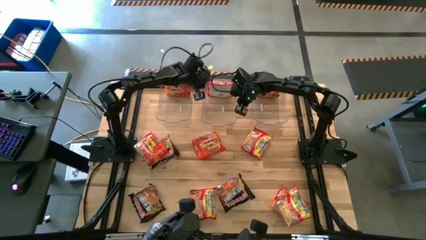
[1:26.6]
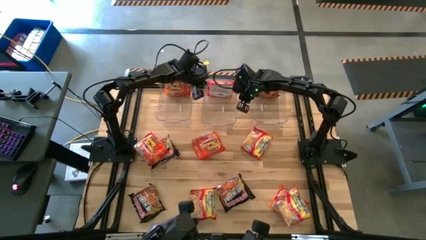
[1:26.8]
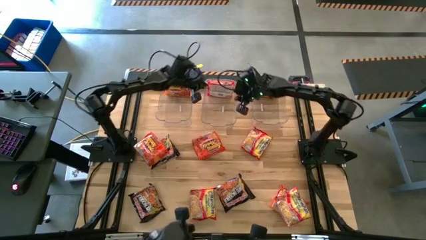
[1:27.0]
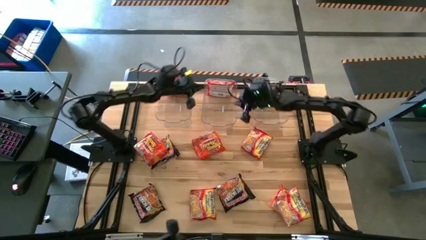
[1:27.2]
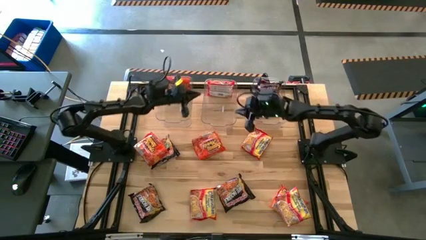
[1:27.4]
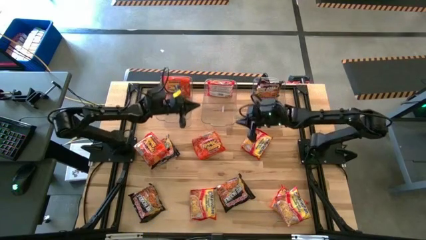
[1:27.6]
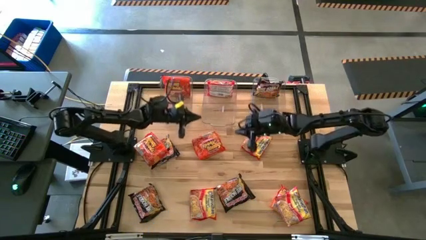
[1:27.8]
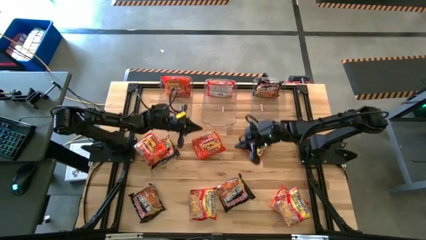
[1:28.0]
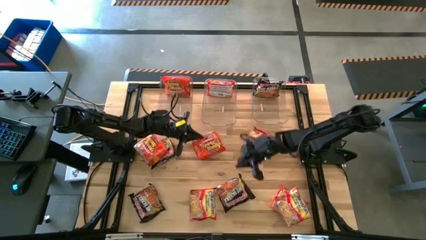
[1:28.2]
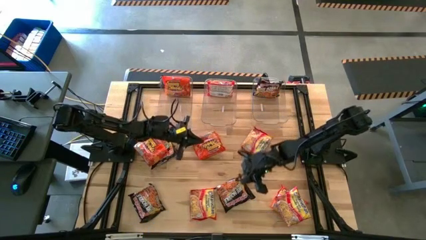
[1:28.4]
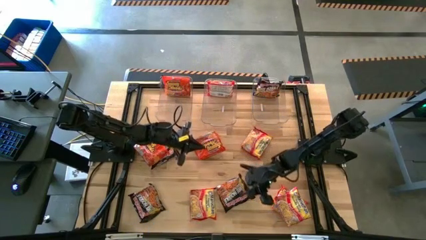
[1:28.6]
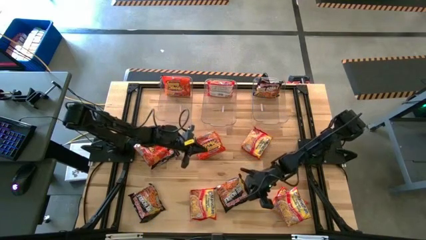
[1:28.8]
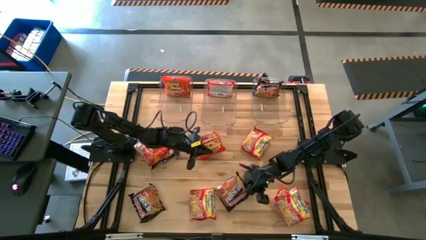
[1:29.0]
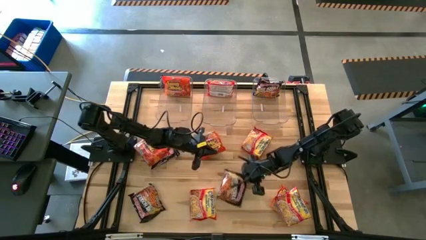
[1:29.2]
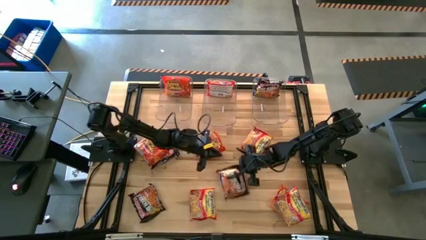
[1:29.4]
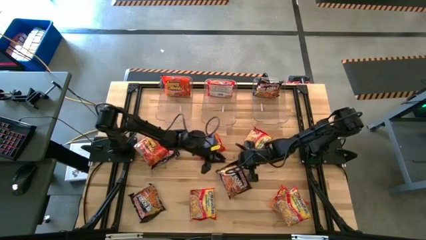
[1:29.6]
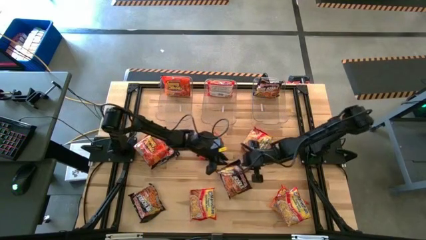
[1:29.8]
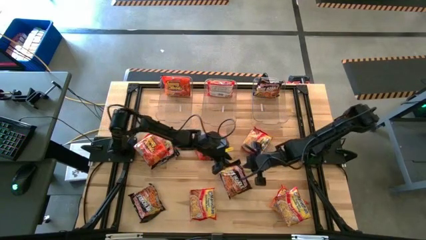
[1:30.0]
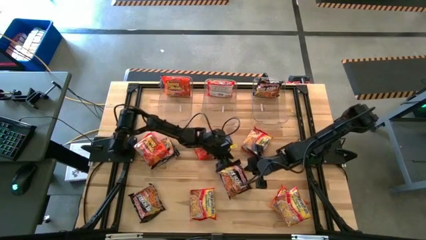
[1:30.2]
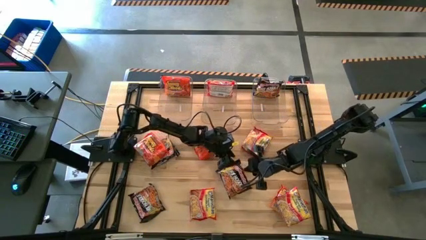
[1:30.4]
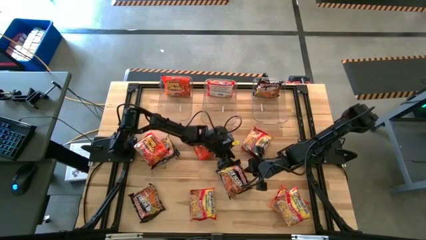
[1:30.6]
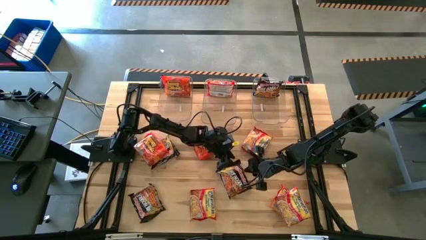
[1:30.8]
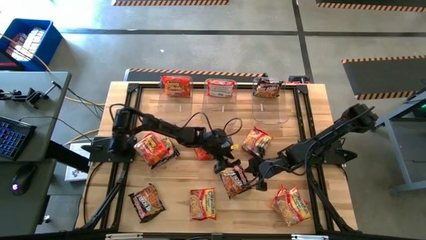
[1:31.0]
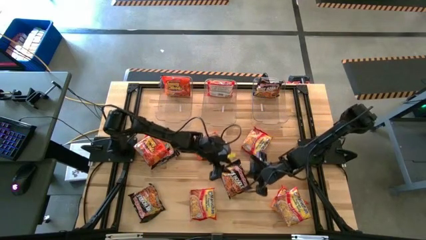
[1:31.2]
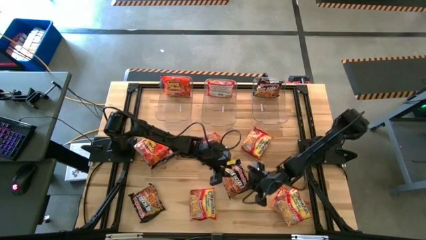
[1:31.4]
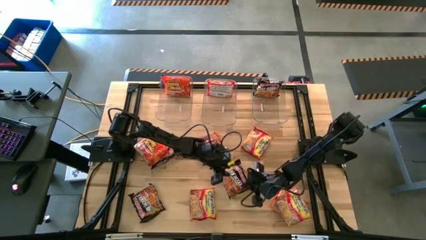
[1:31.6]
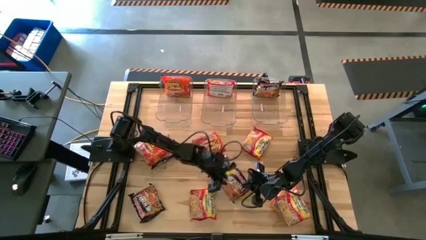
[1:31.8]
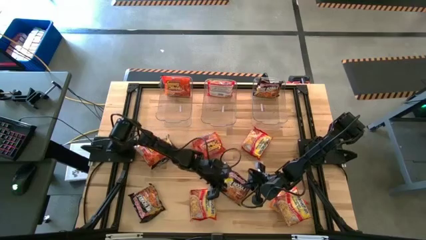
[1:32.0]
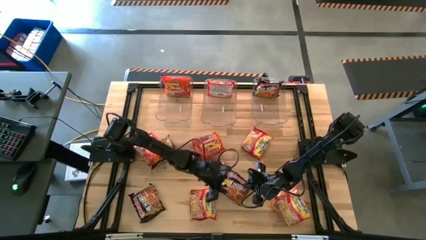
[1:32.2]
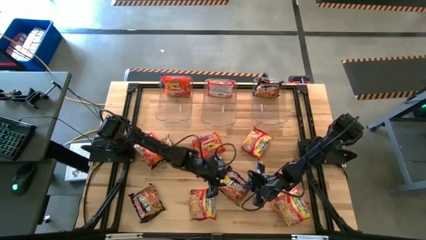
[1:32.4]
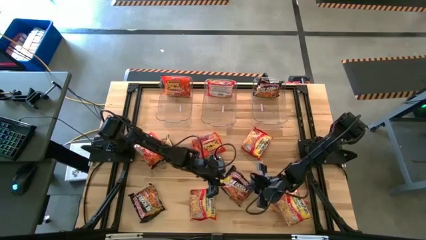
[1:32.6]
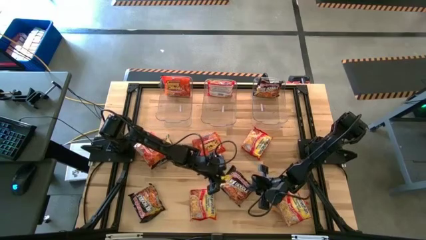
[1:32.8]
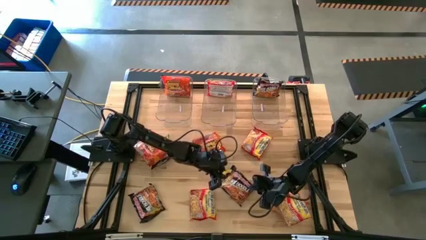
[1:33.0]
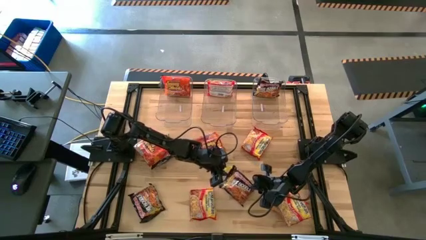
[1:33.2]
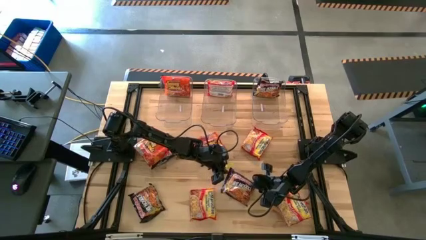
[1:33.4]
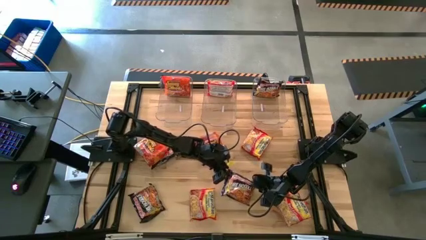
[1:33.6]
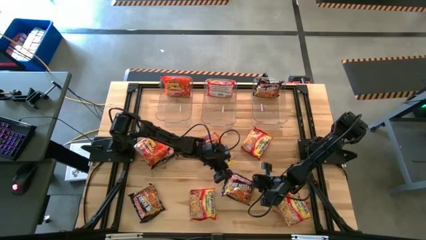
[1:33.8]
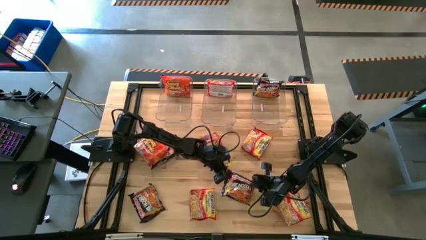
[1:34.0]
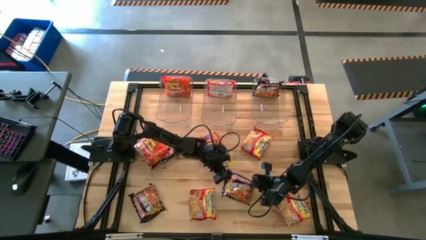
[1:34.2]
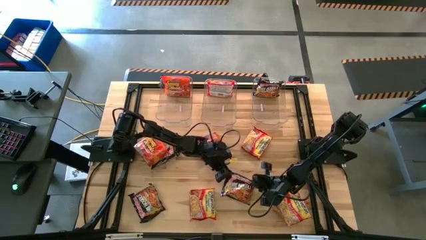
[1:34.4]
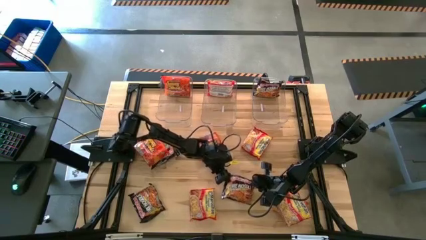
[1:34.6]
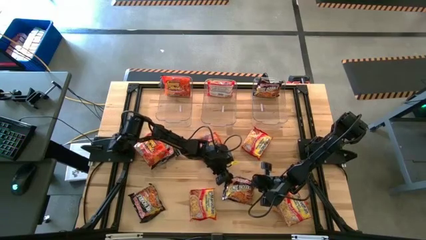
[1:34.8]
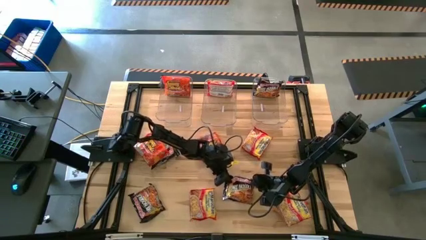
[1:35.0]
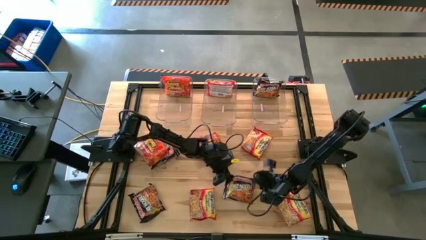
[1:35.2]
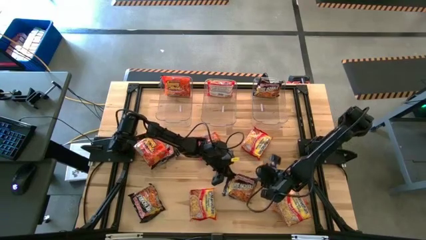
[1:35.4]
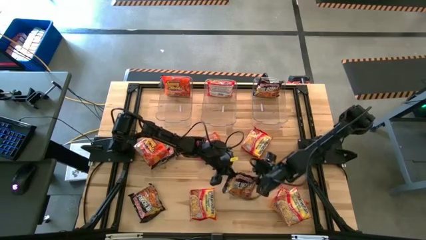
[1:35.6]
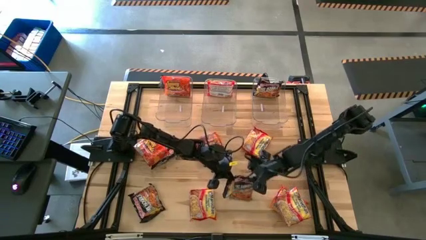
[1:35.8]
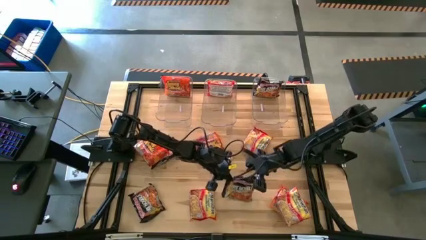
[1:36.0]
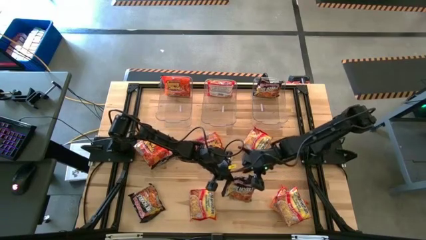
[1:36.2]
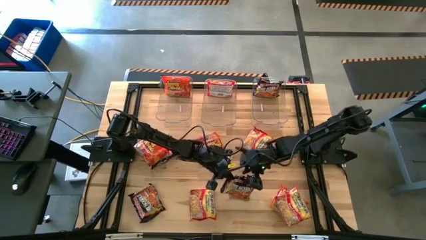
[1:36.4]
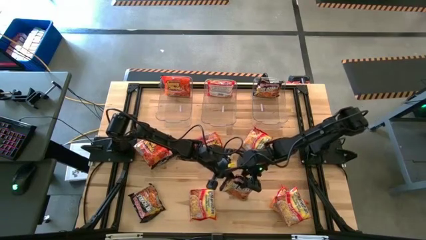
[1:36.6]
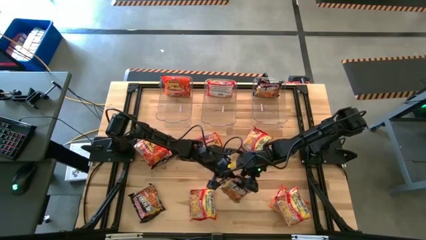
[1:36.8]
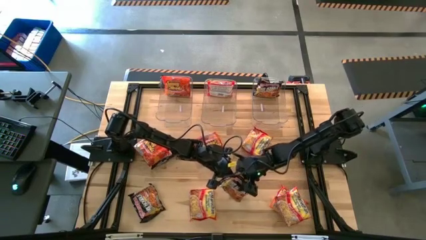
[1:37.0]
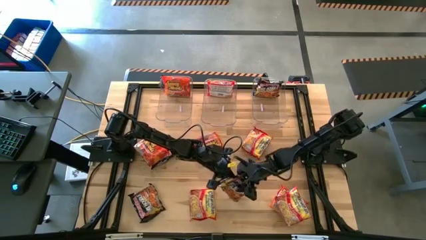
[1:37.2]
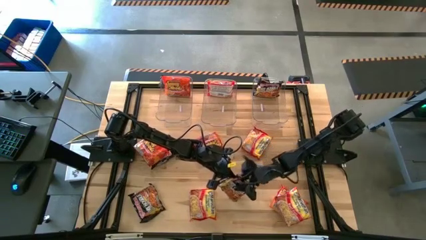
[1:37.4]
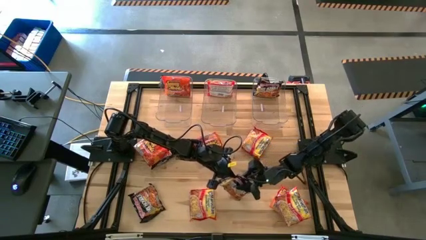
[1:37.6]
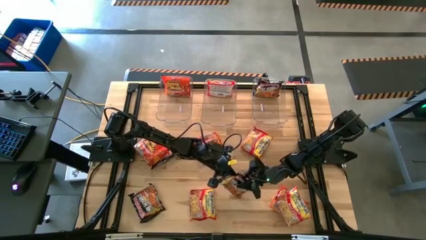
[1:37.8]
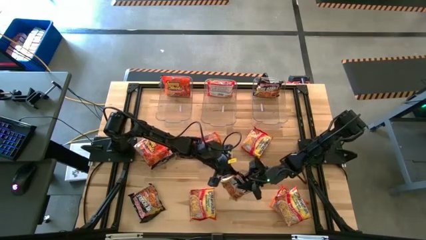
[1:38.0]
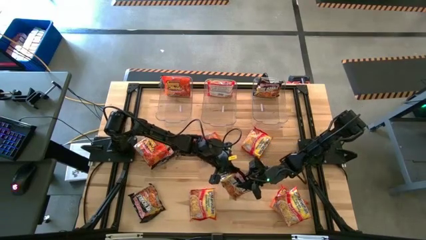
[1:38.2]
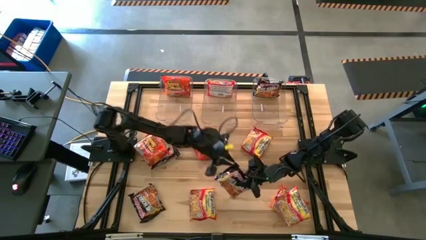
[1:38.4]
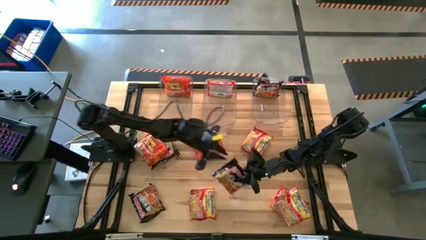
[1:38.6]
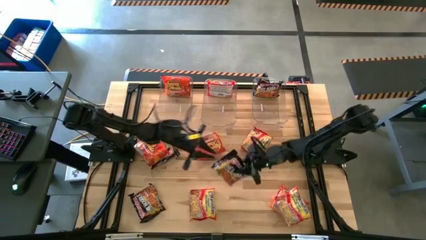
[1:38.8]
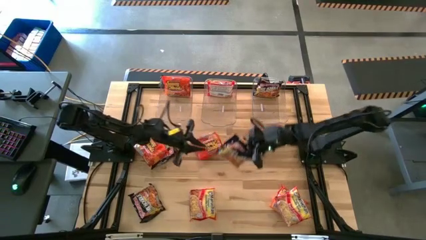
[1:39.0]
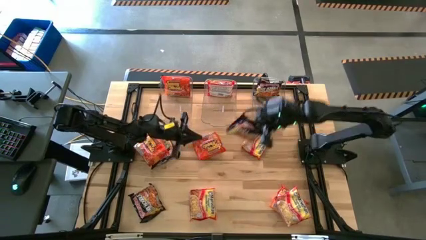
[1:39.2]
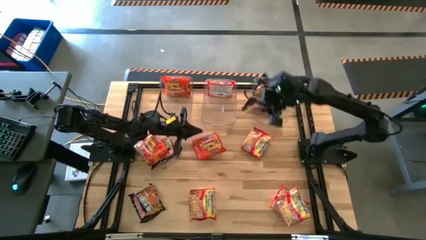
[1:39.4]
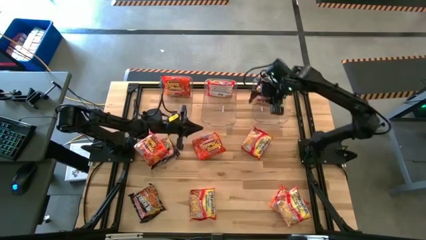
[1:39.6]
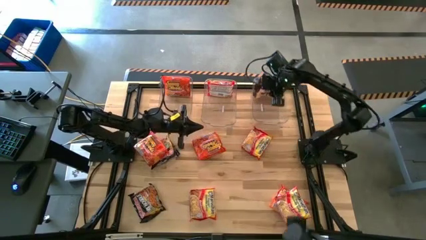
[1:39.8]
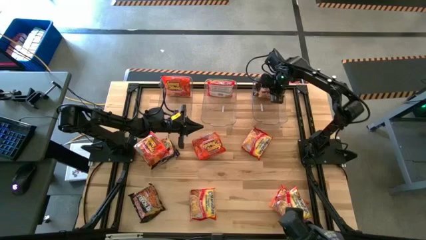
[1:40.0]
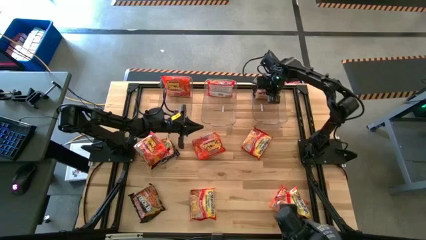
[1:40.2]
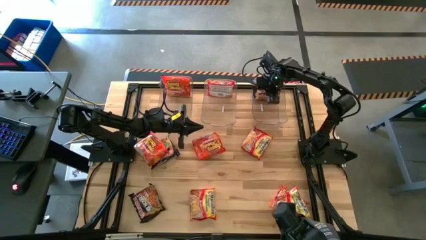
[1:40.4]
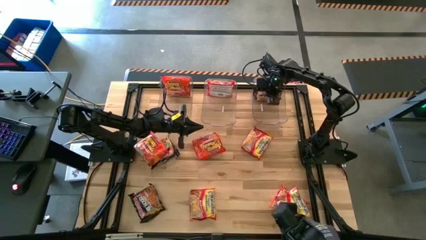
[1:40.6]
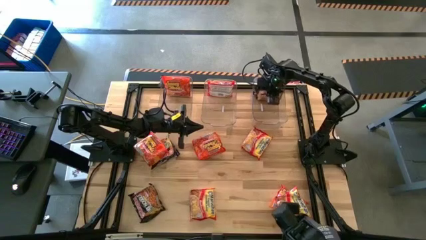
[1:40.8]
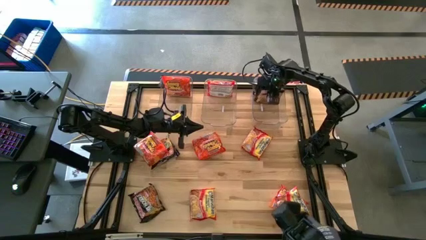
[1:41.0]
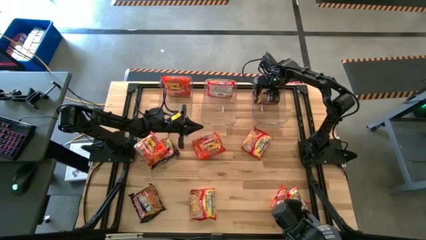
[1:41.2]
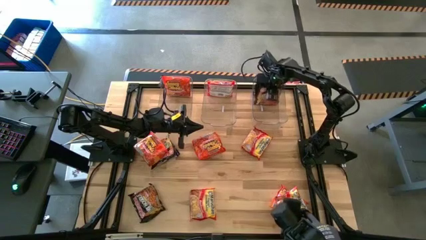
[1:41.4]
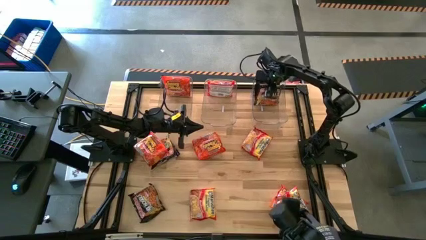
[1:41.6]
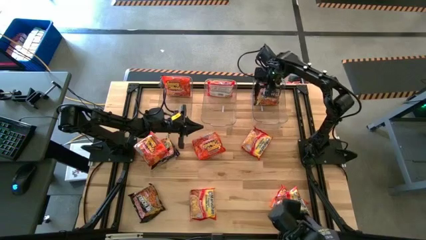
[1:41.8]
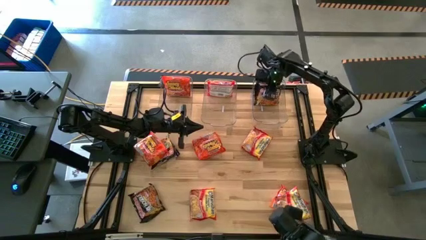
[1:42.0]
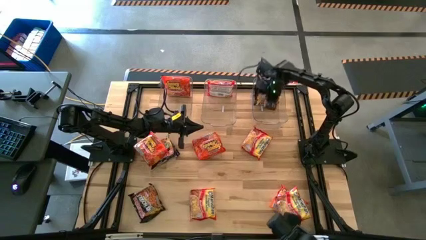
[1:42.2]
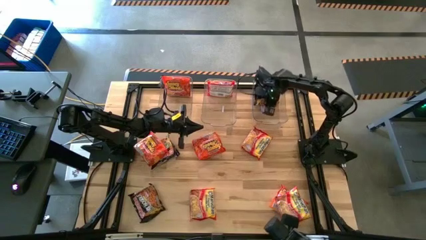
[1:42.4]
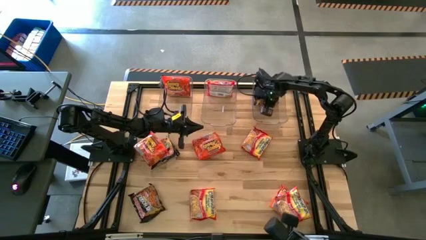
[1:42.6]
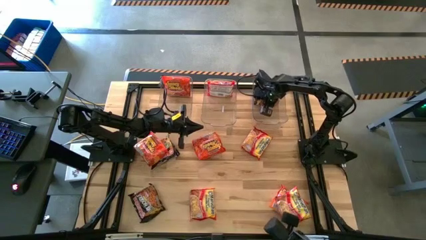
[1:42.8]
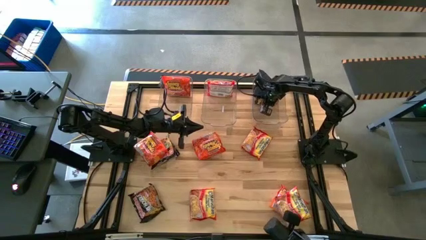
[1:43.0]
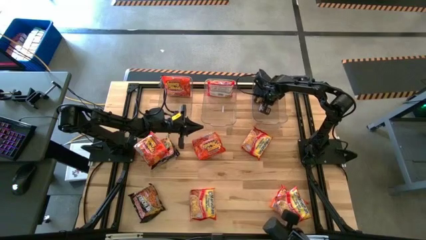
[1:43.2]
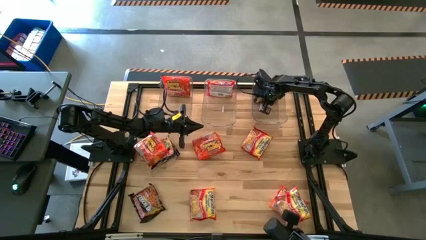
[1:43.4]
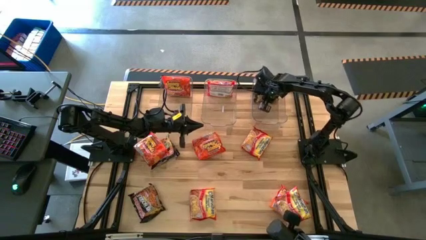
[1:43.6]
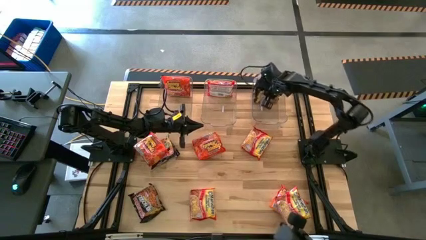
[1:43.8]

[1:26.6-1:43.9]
Task: Sort Maruchan noodles
Put the black noodle pack into the right transparent bin
